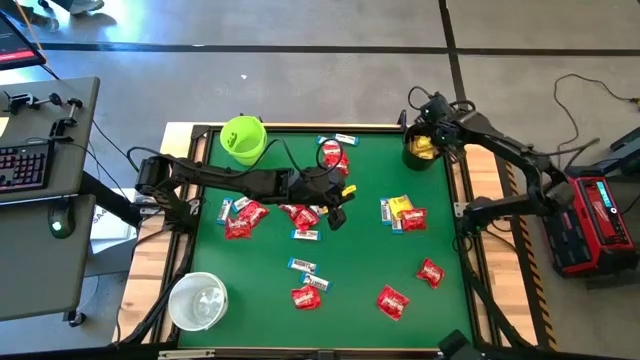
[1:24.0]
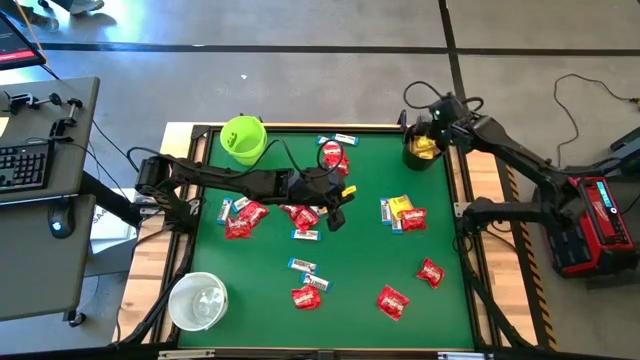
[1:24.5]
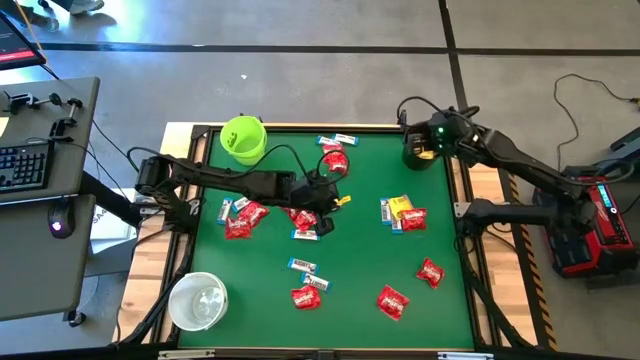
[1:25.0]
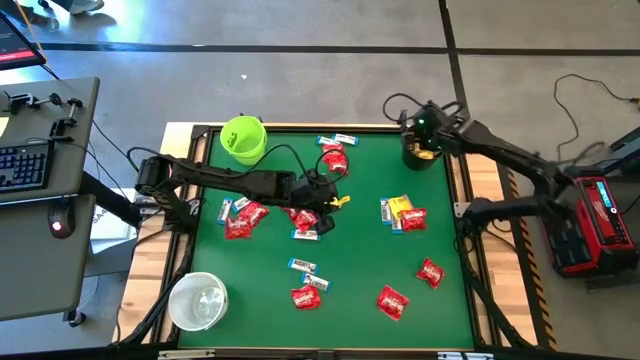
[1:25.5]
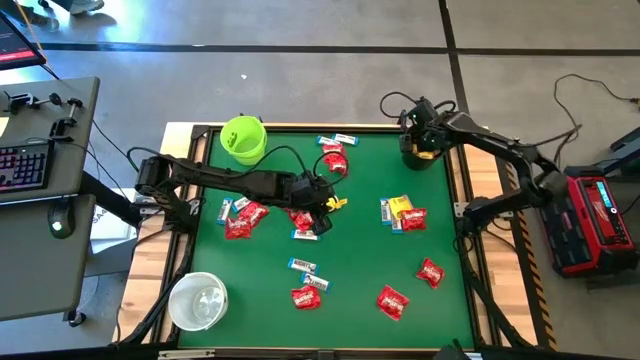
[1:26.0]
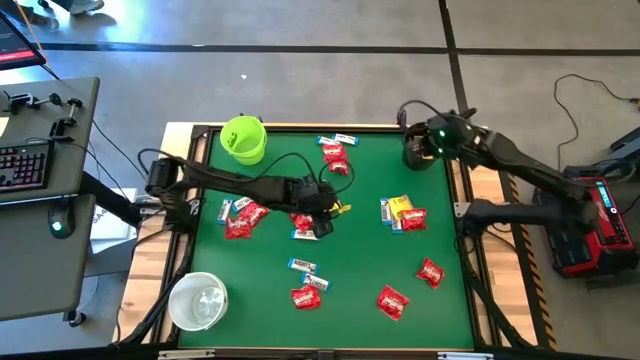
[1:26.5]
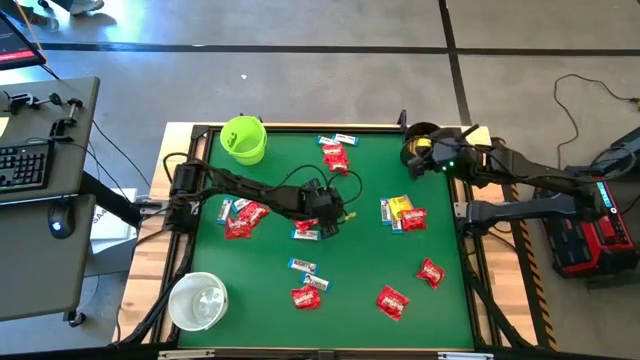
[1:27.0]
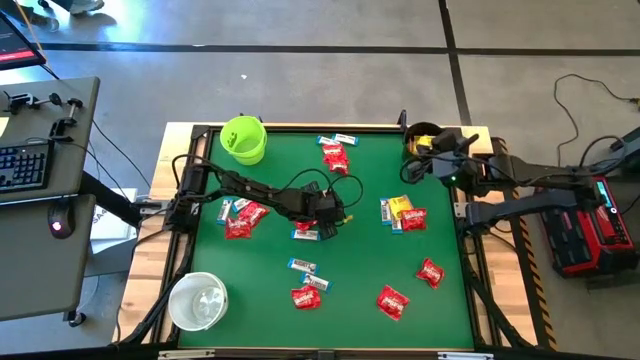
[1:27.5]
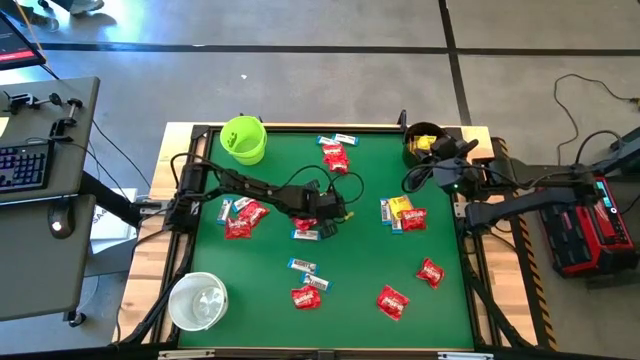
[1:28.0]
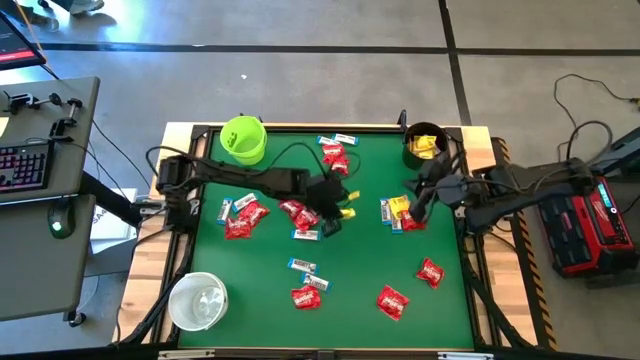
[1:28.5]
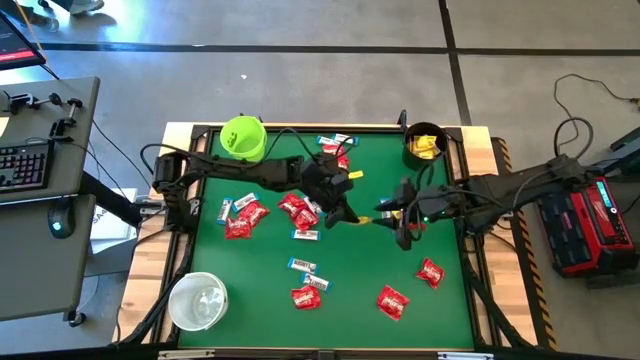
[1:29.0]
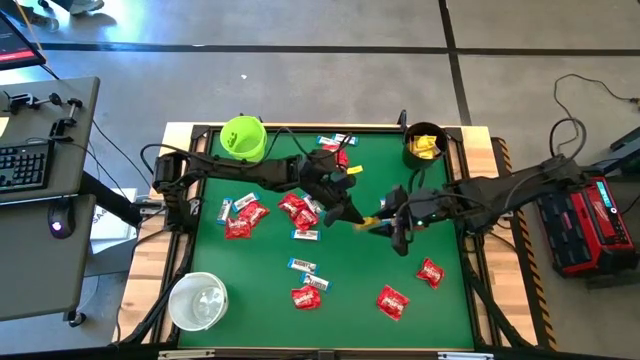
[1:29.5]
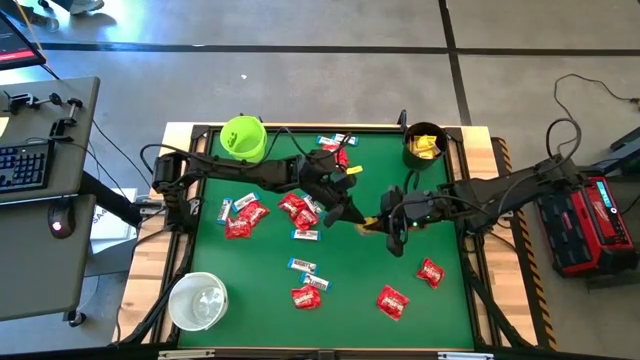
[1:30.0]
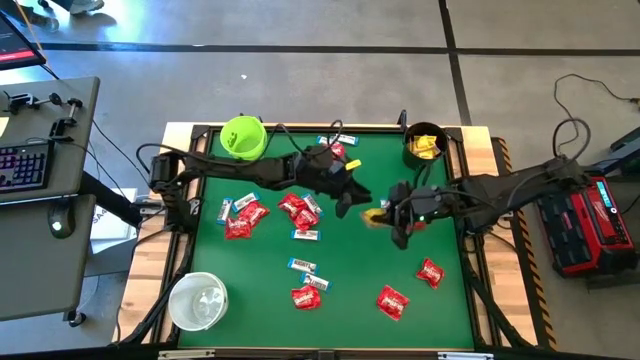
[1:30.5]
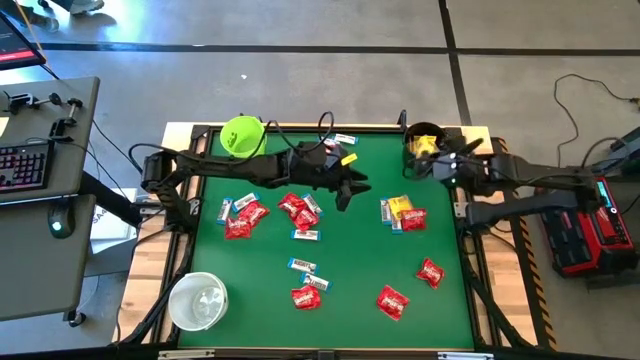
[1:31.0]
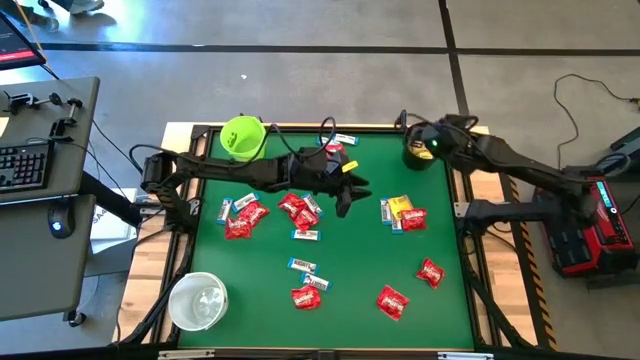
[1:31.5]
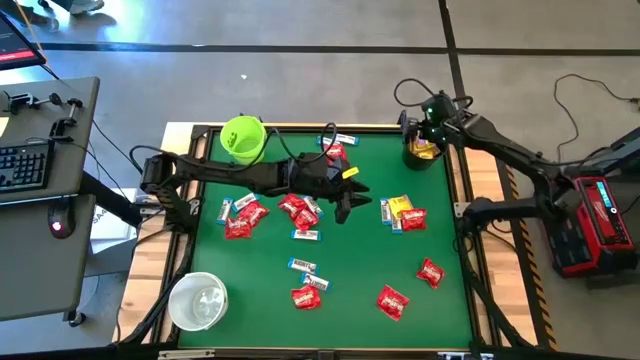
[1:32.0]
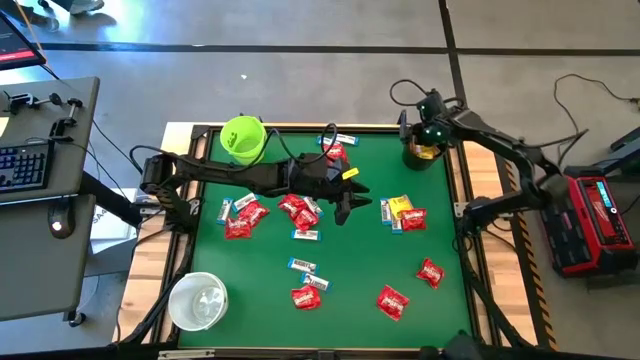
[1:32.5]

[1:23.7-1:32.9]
Task: Sort candy by brand, put in halloween buckets
Put the yellow candy into the black bucket

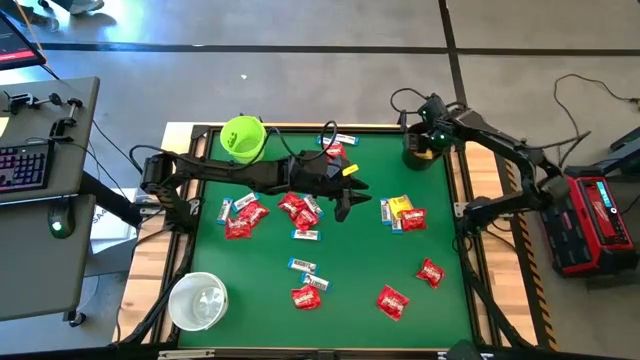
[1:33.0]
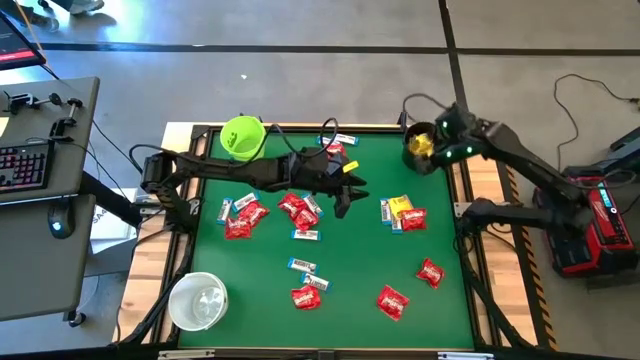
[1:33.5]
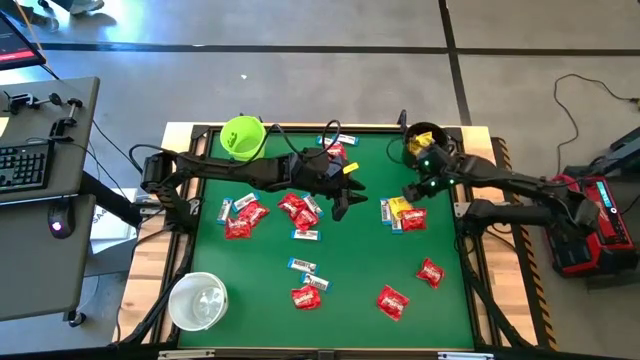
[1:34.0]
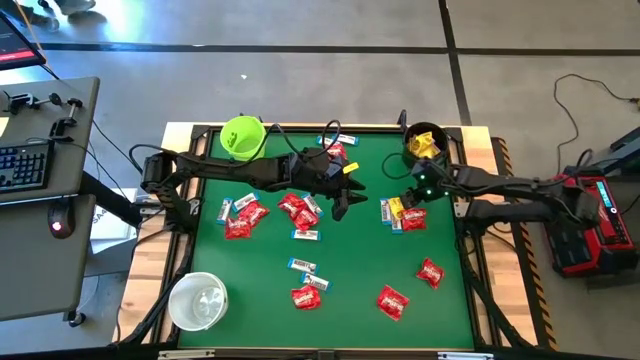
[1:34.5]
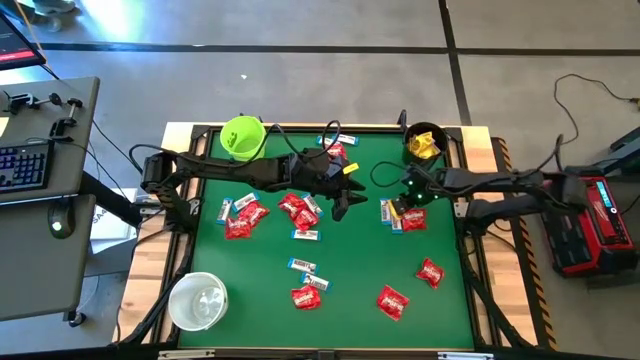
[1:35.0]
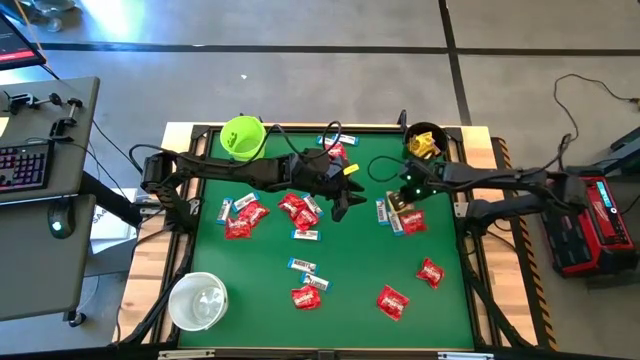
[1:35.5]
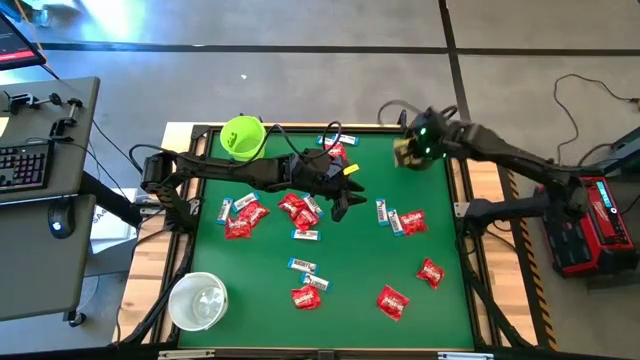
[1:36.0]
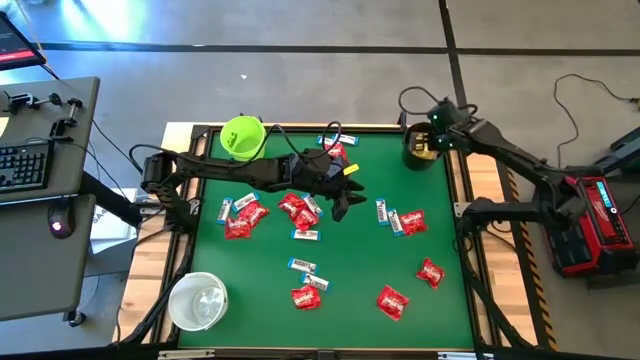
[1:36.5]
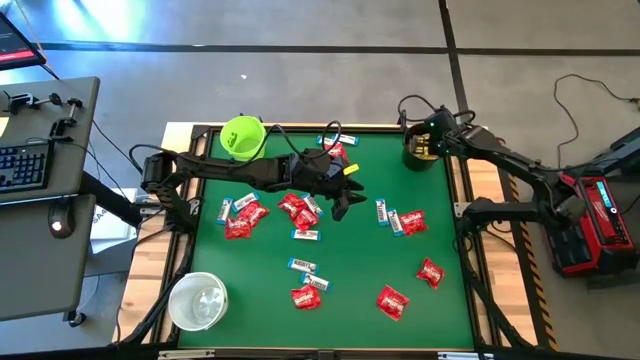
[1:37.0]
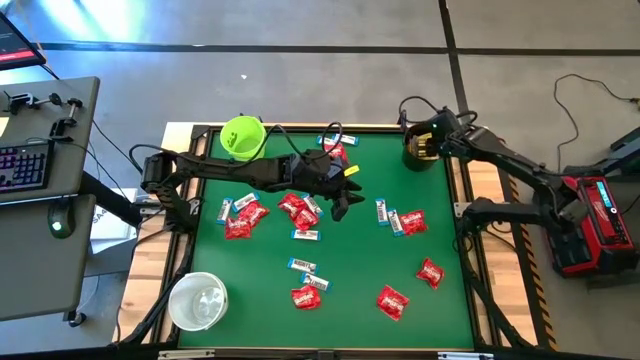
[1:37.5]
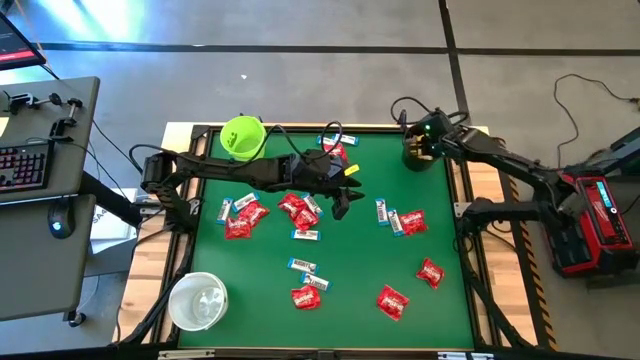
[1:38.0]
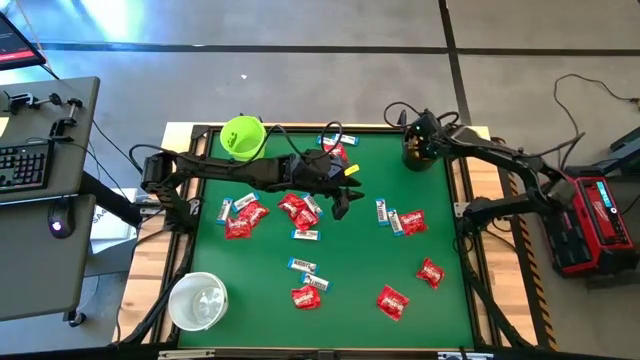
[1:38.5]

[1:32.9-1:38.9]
Put the yellow candy into the black bucket

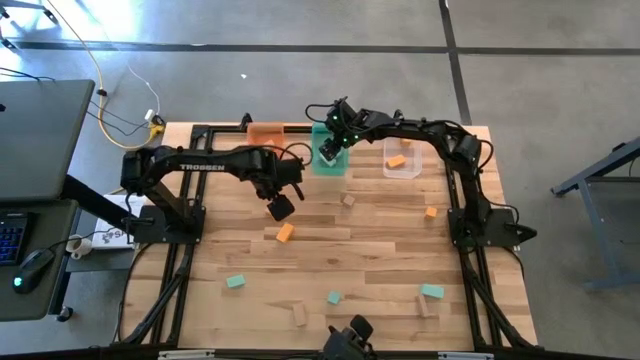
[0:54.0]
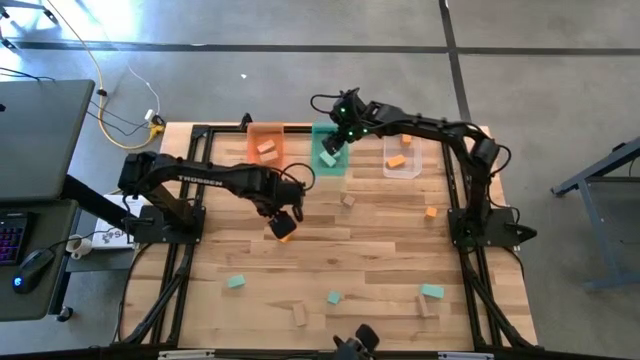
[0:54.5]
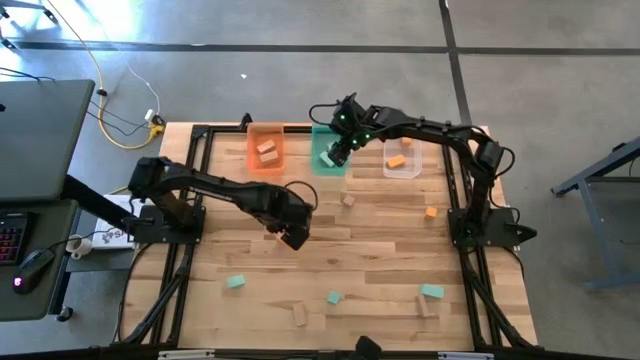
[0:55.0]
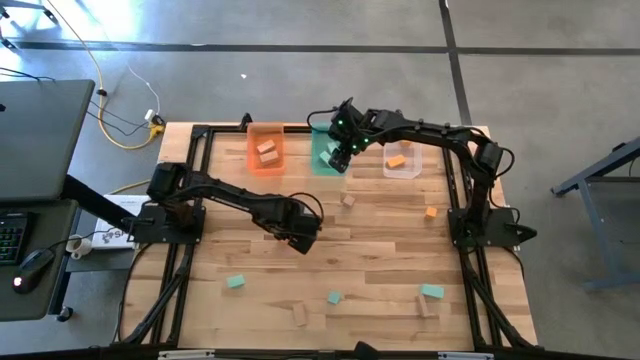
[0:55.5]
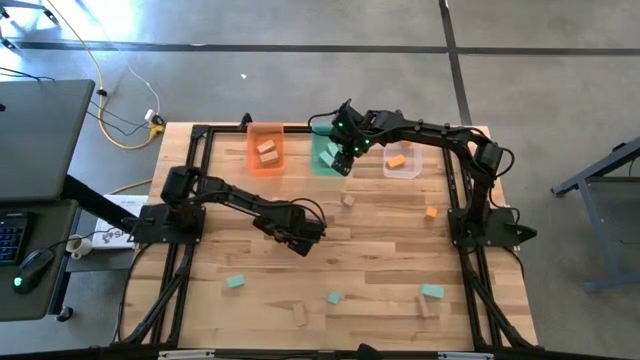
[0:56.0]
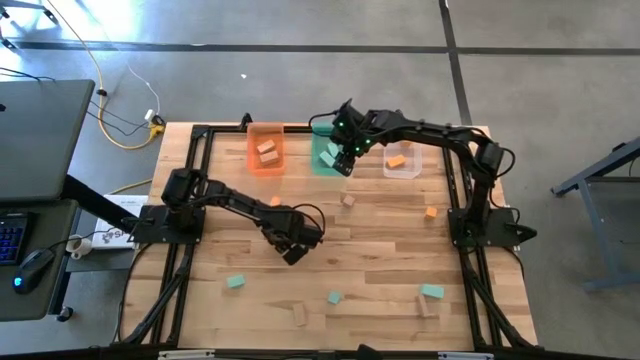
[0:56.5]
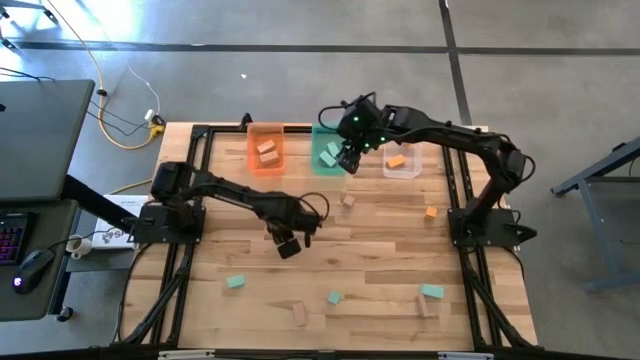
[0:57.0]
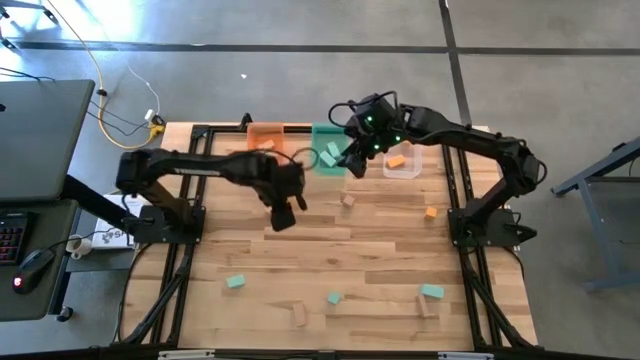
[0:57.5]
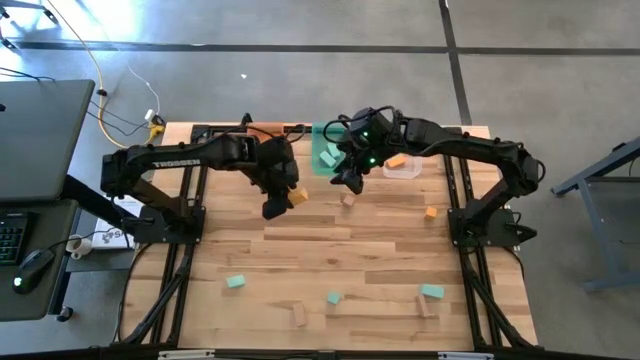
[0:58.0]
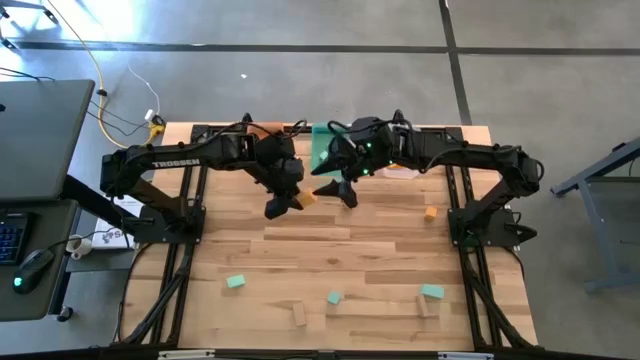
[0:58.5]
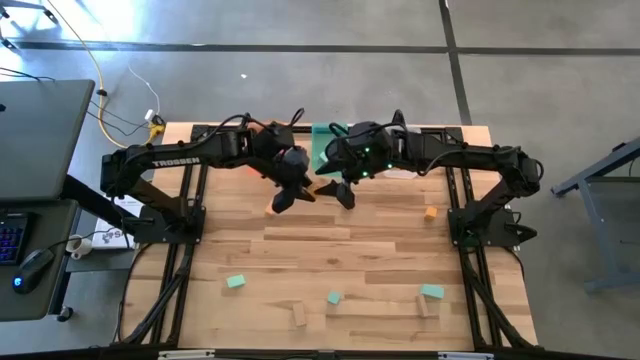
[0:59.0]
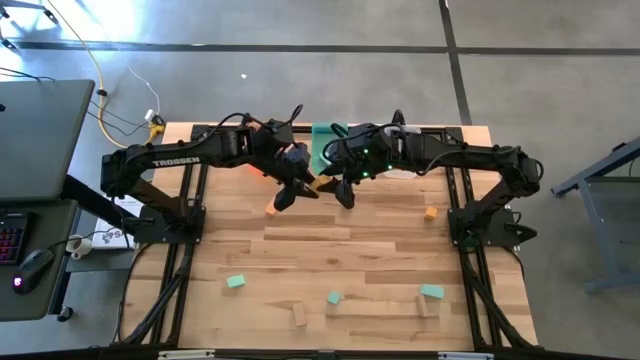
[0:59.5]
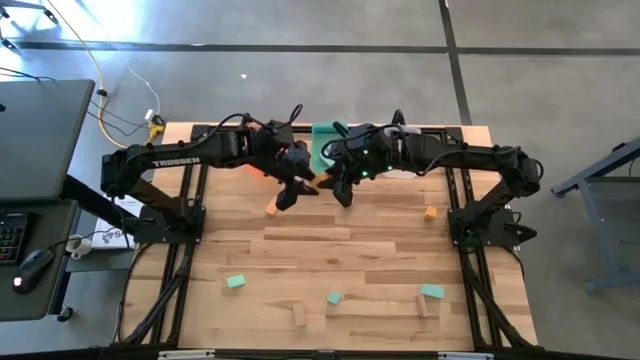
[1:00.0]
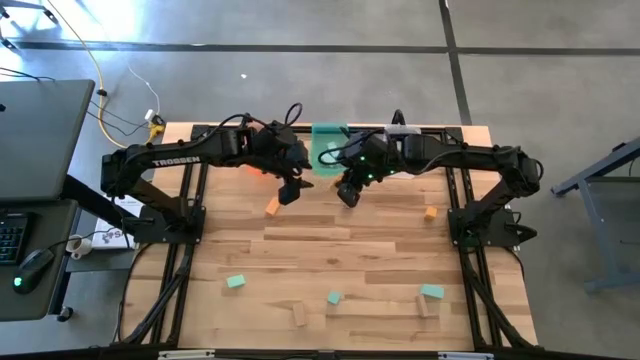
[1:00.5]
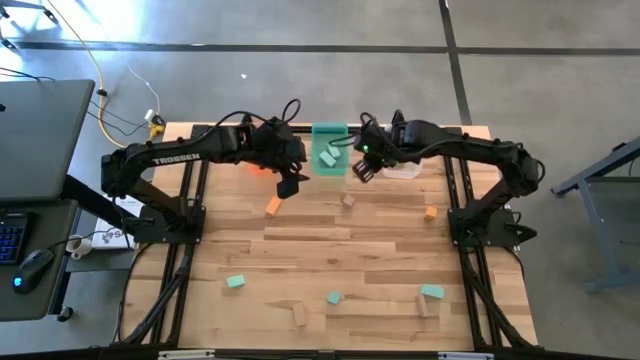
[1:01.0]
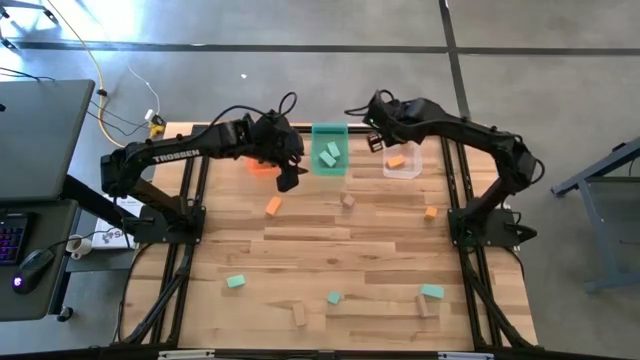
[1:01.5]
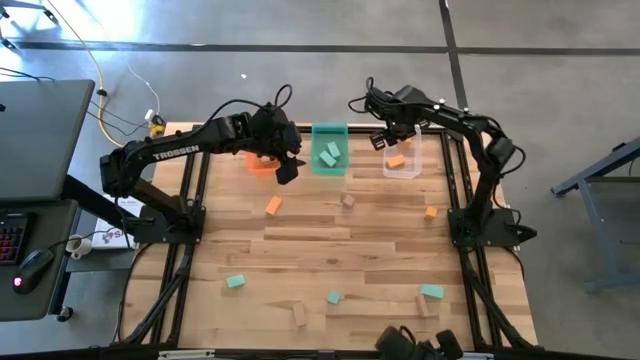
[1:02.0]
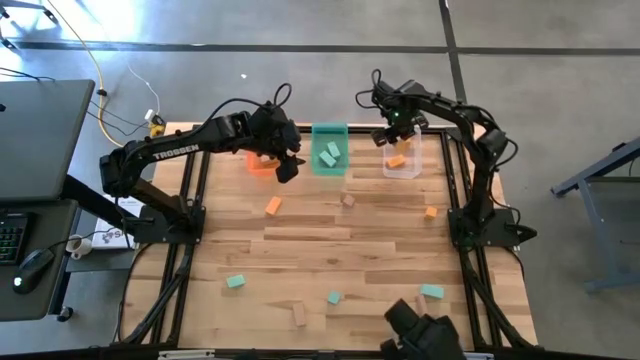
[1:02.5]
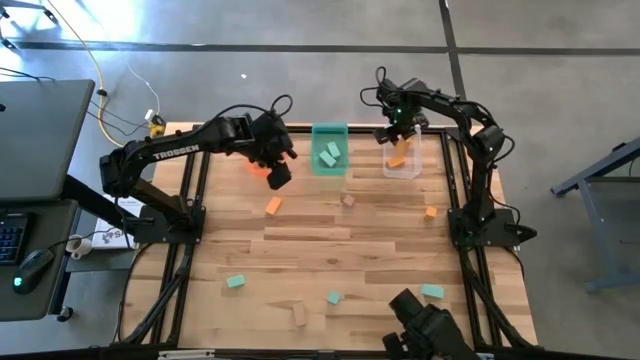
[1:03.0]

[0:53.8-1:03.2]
Task: Sort & place blocks by color
Put the yellow block into the transparent bin
